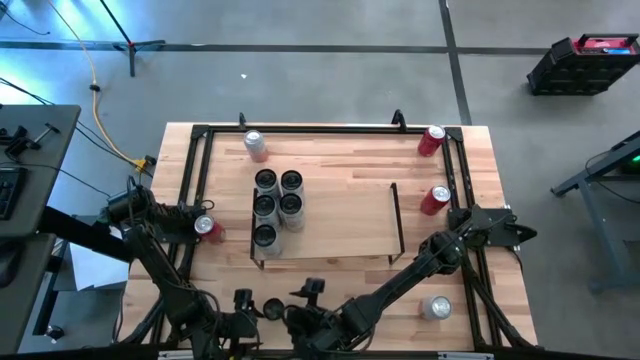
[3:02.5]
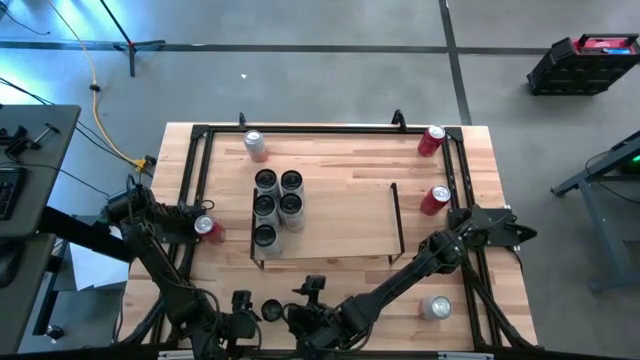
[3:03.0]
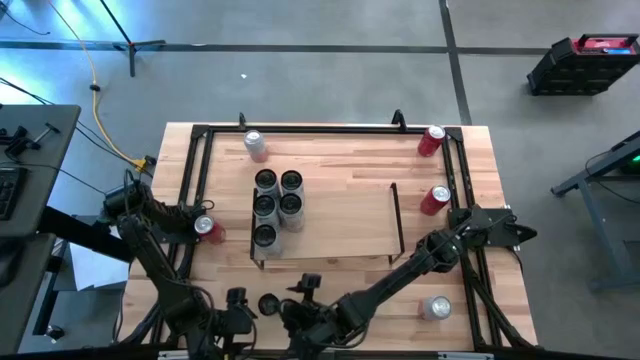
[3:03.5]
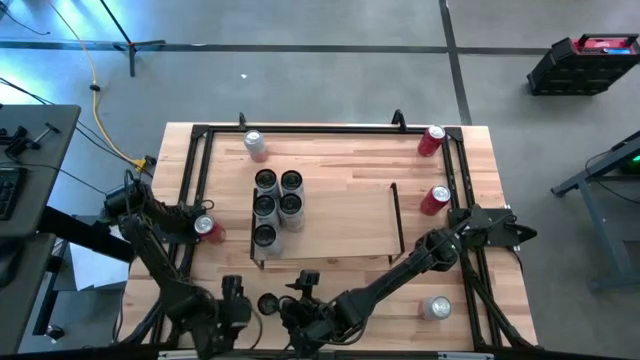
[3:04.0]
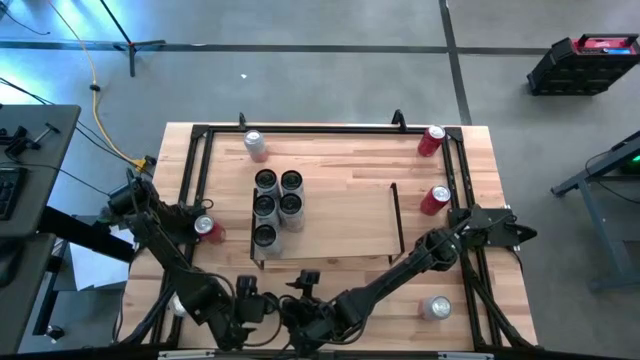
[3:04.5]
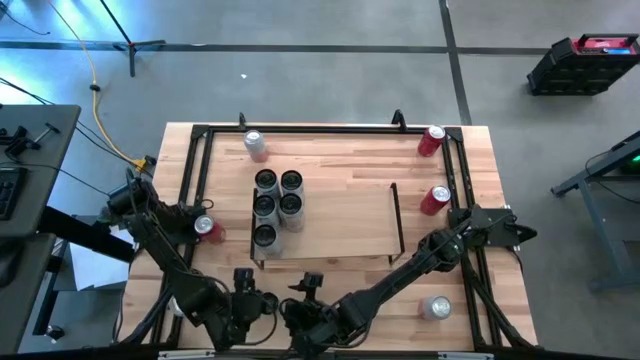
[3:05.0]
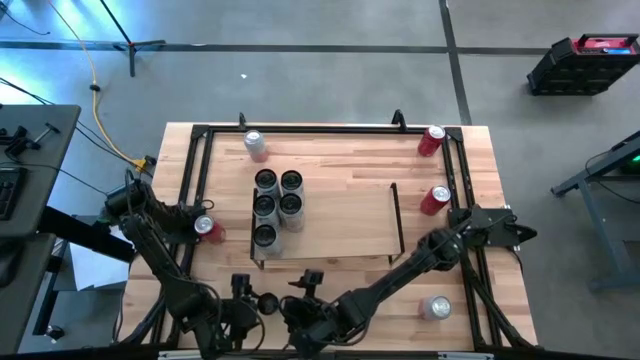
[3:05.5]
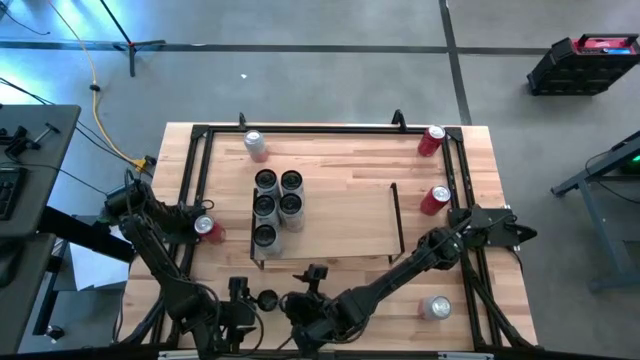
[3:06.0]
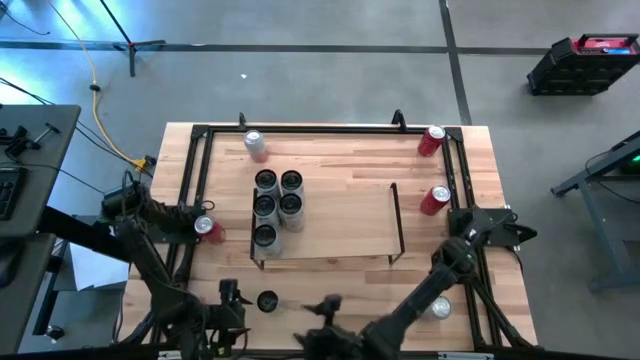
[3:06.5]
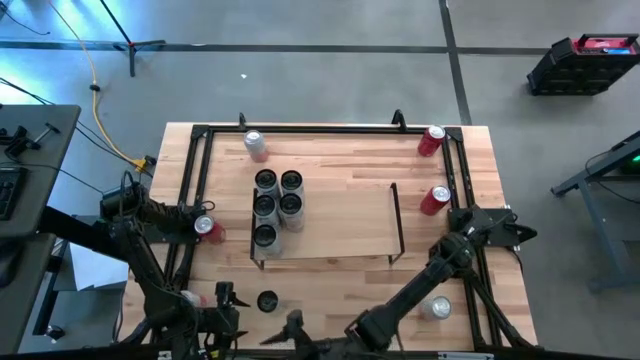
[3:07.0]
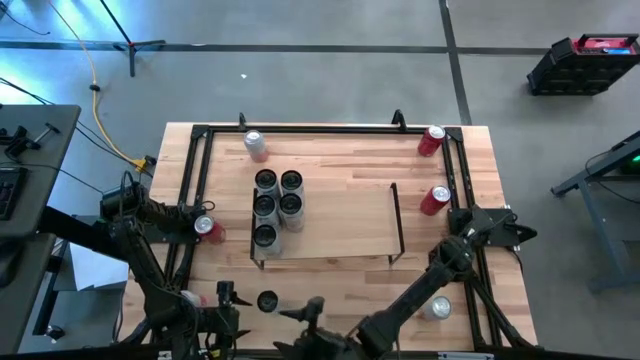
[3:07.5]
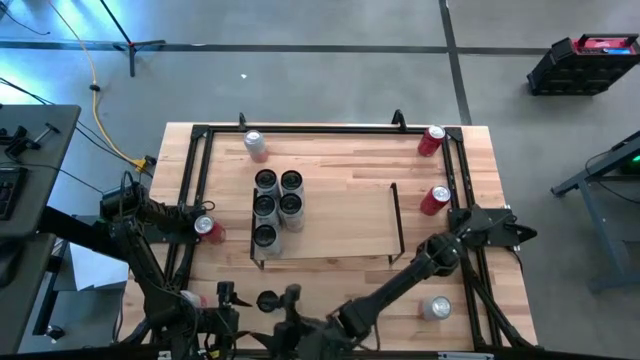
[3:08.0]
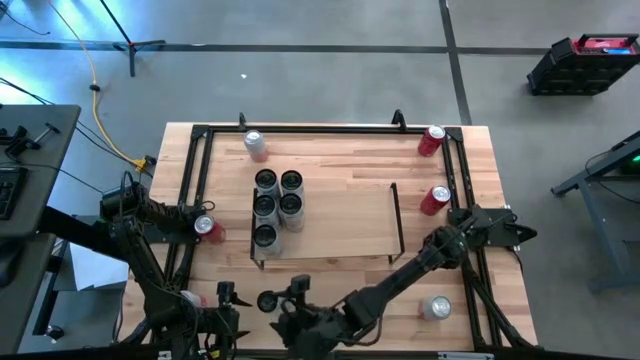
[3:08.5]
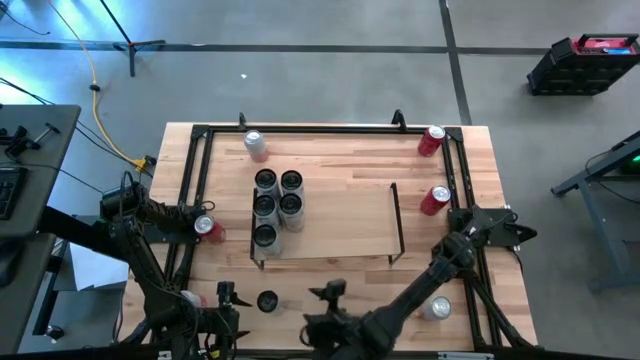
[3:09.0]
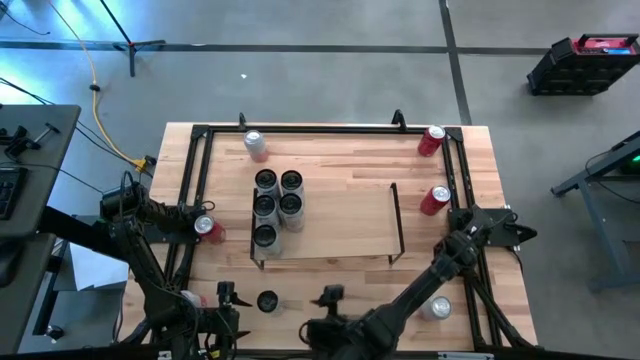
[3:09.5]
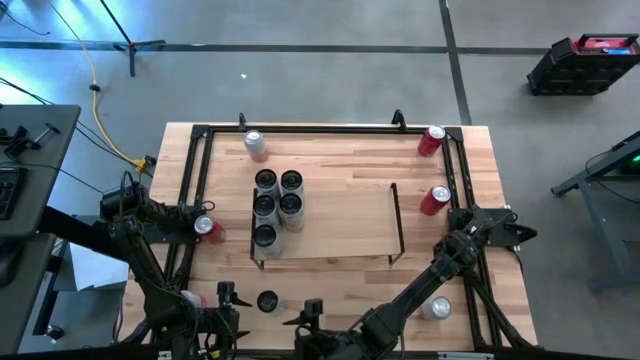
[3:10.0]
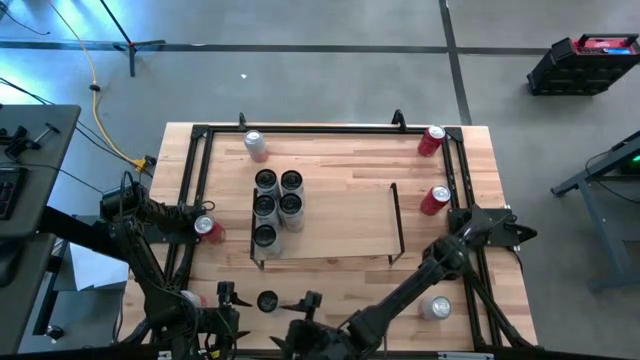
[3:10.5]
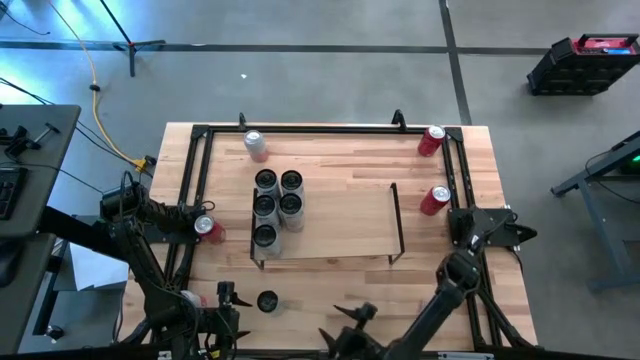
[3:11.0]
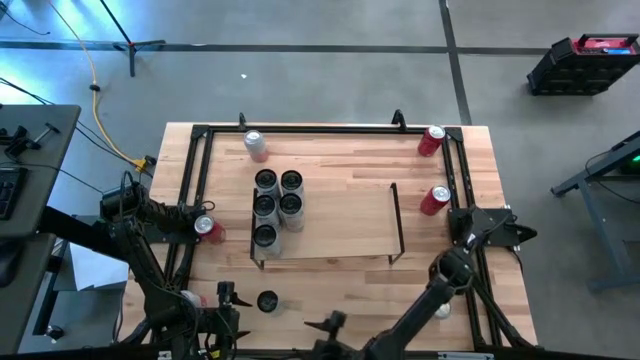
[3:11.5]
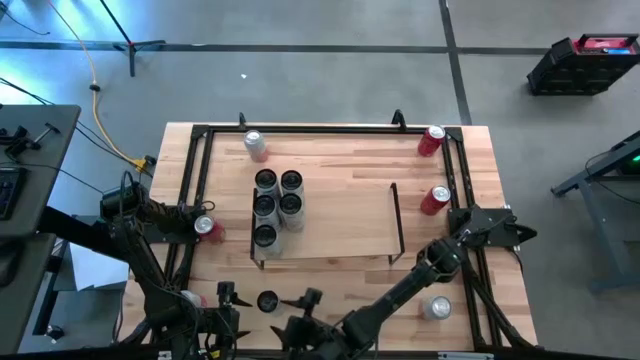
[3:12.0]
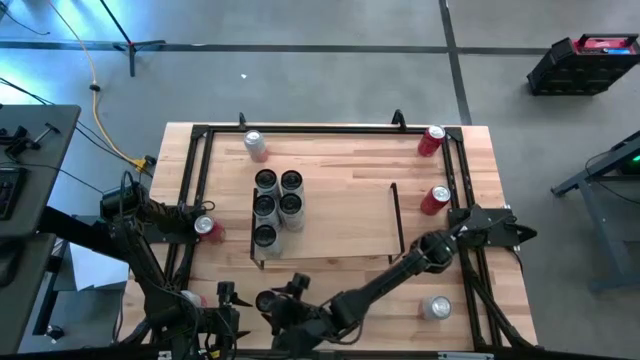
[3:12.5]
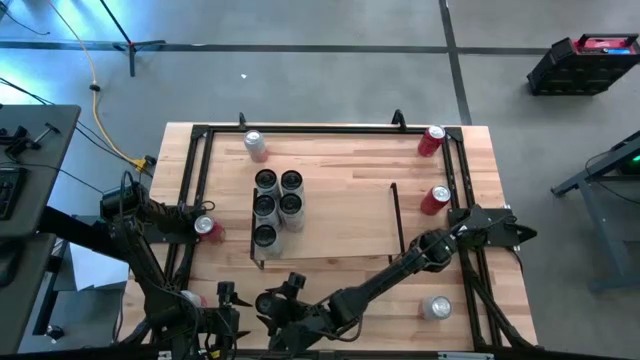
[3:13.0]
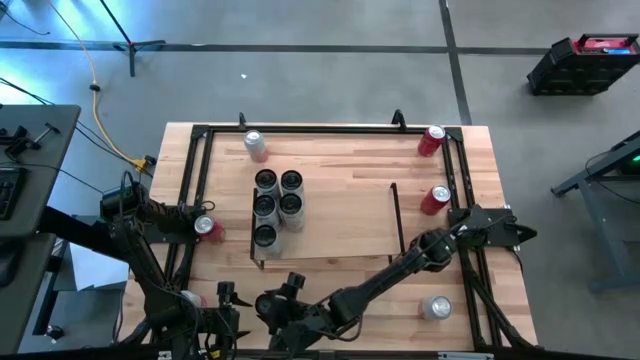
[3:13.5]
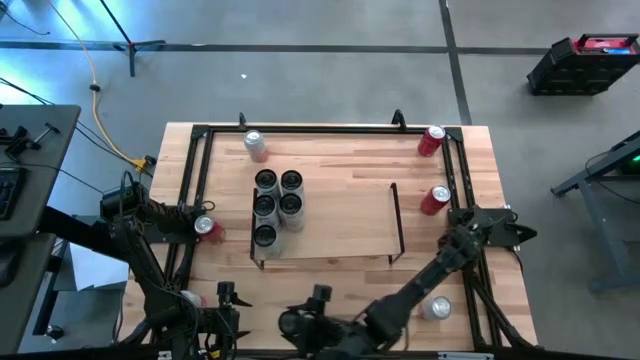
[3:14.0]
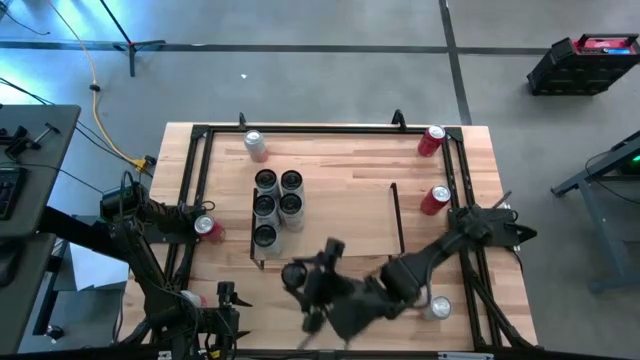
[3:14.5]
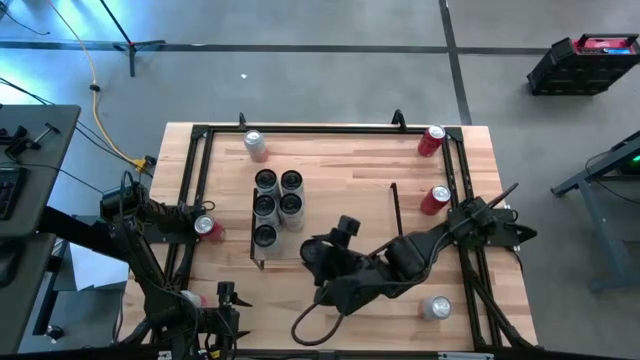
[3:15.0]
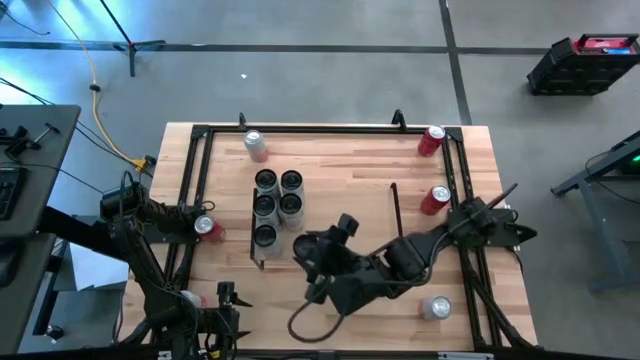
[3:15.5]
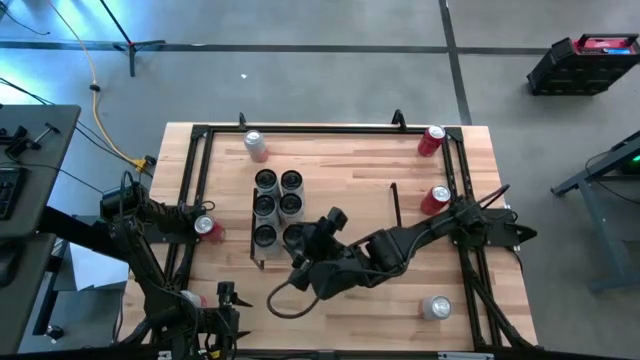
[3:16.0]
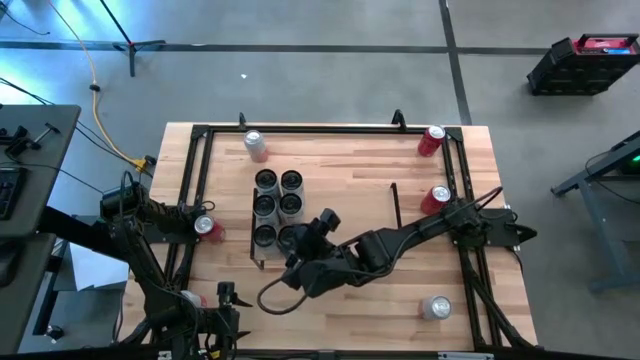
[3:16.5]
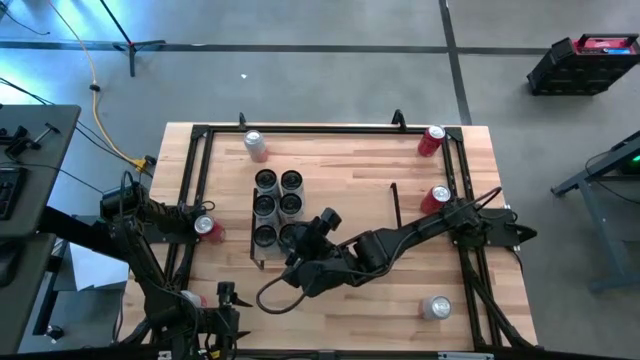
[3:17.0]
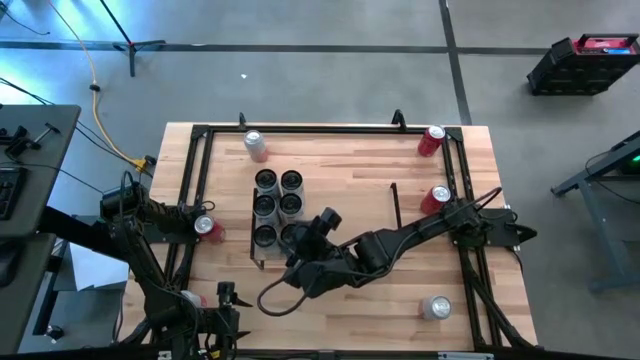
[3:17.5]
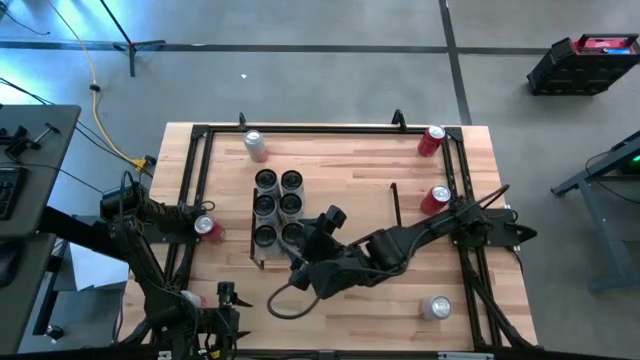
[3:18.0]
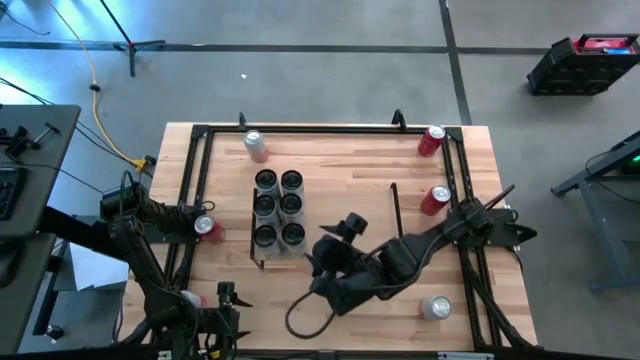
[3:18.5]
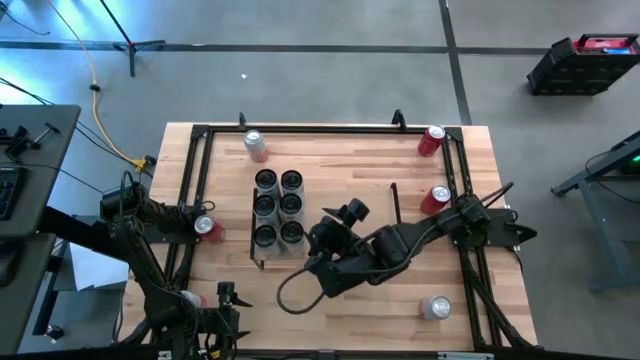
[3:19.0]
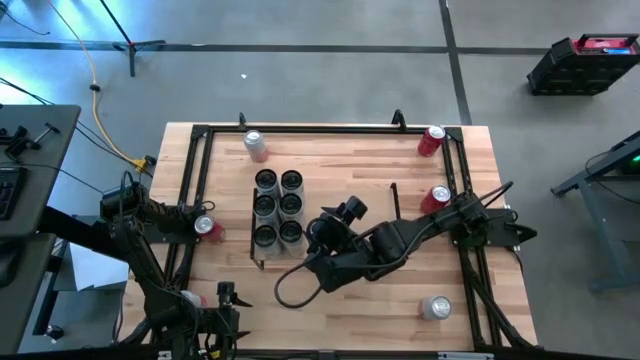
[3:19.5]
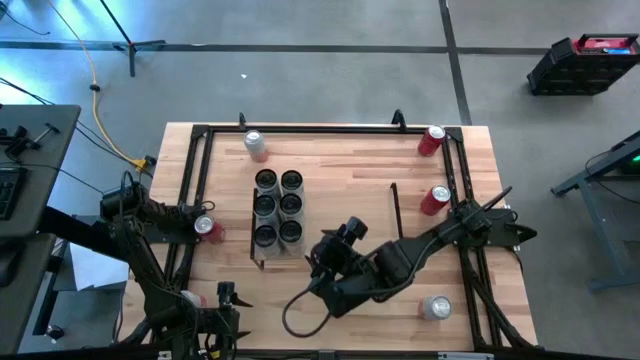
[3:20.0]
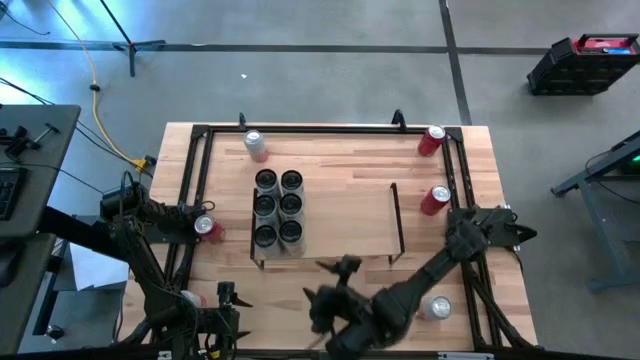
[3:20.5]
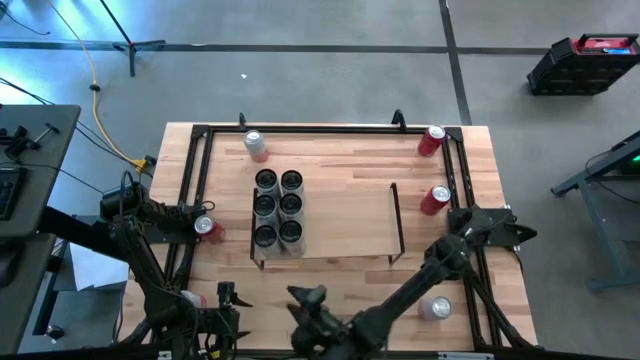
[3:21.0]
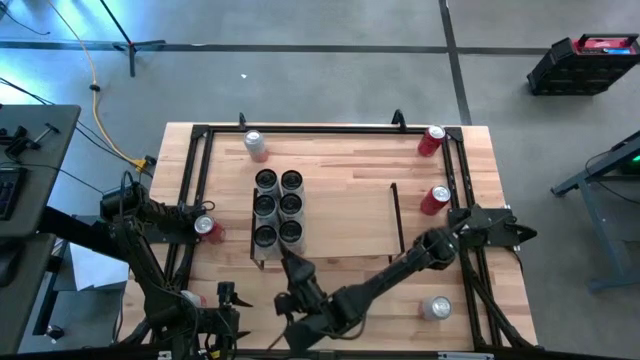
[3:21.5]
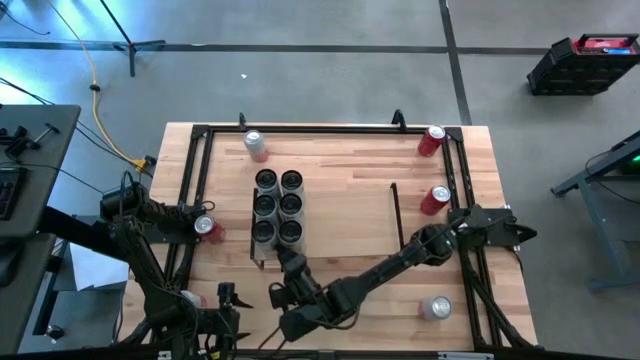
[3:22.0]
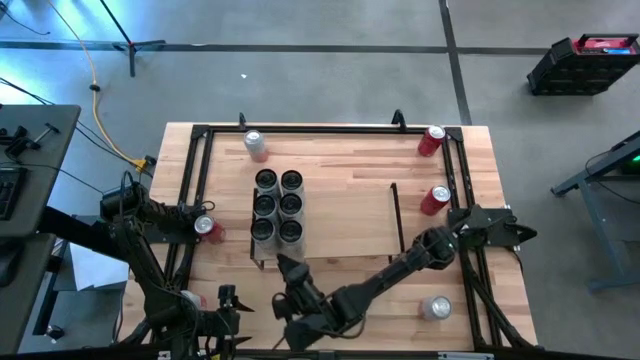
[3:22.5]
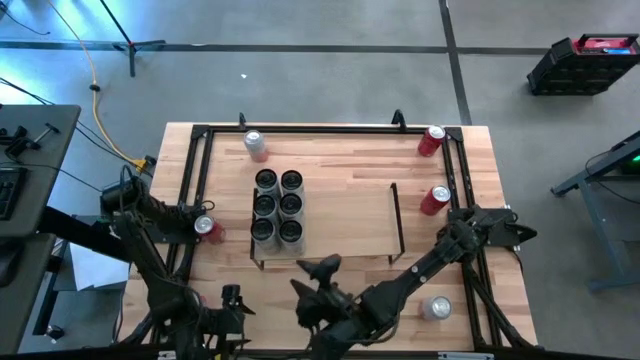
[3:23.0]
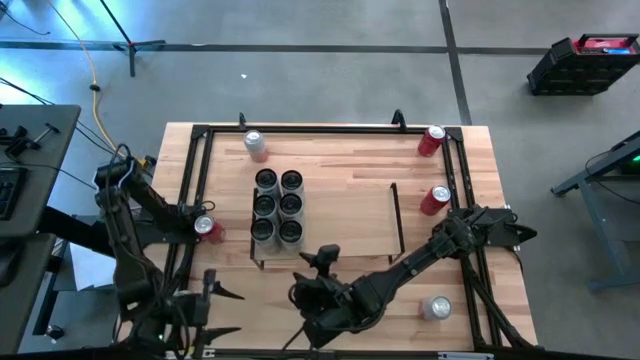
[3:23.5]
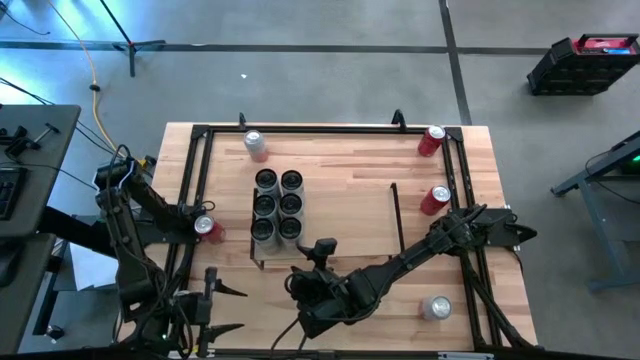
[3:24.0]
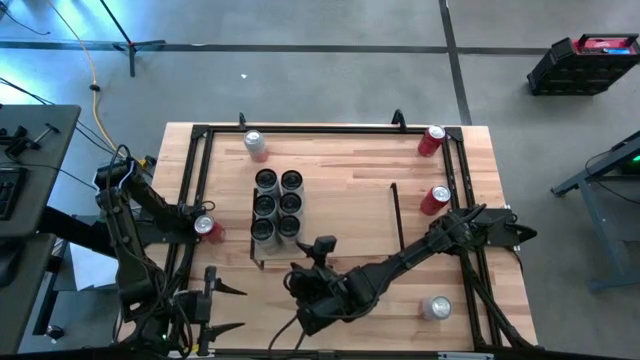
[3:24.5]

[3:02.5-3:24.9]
Task: Place canned beverage on shelf
Put the white pink soda can aligned with the other white pink soda cans on the shelf
